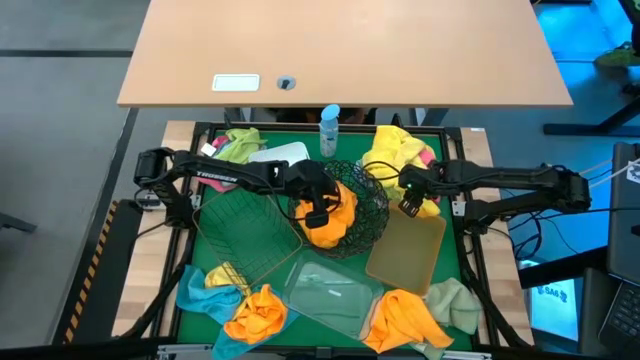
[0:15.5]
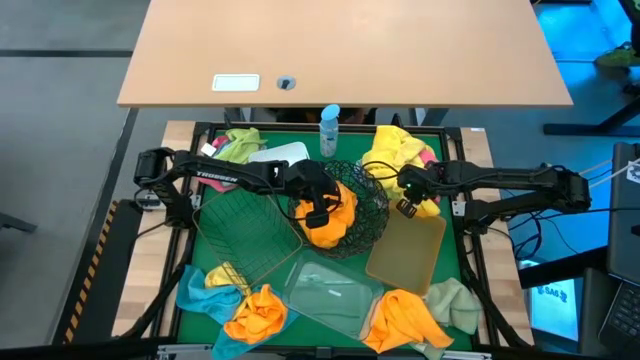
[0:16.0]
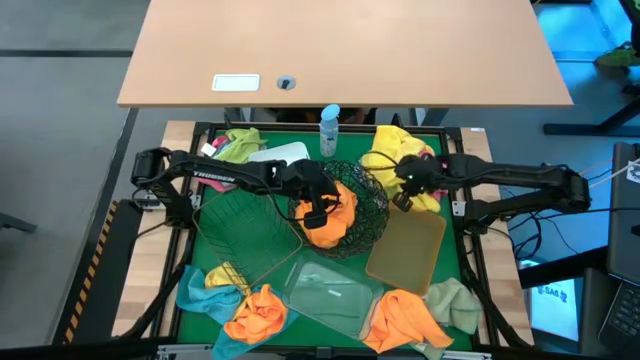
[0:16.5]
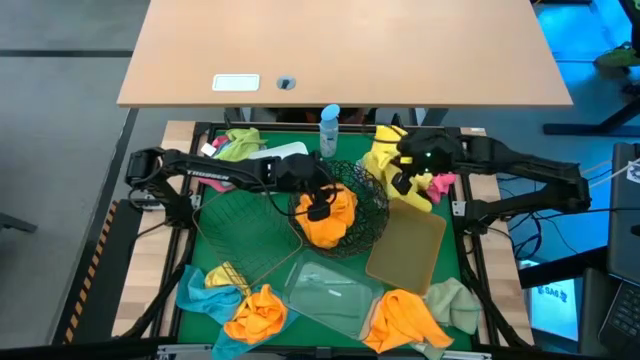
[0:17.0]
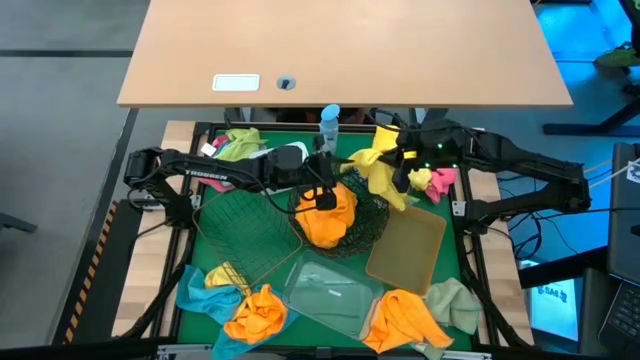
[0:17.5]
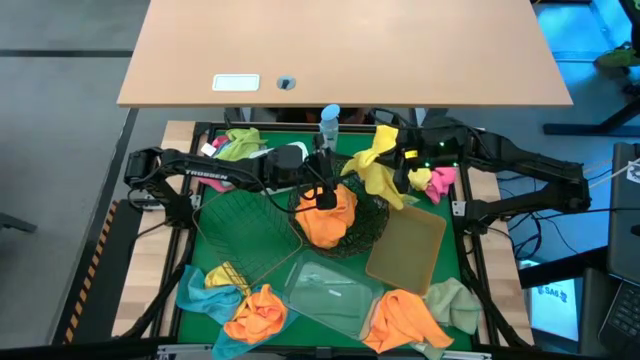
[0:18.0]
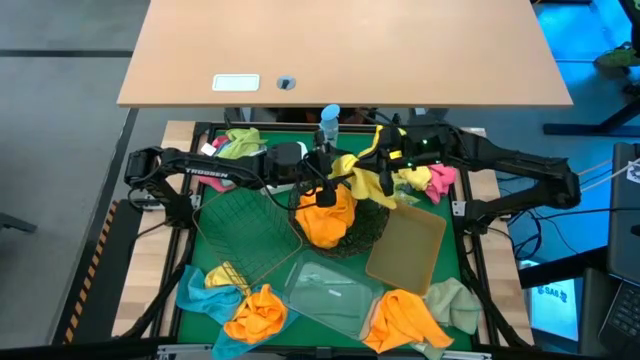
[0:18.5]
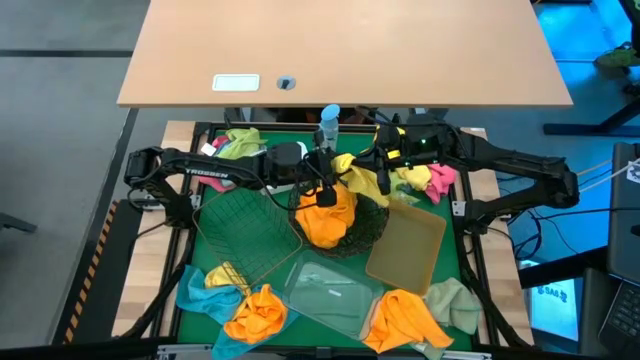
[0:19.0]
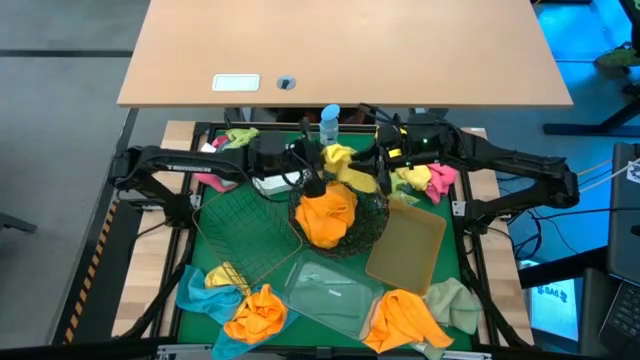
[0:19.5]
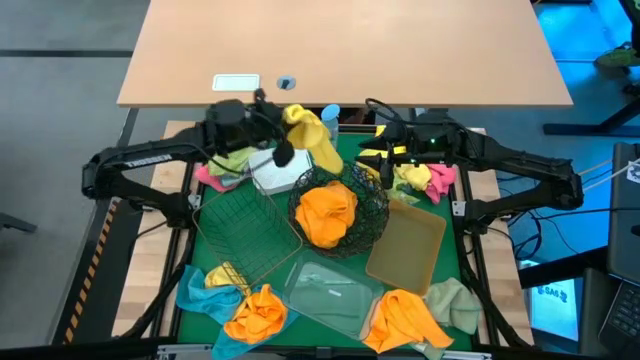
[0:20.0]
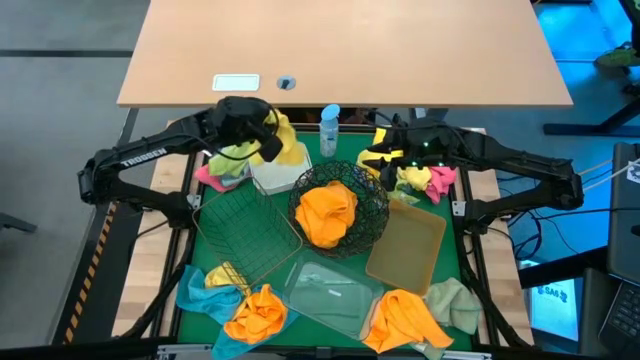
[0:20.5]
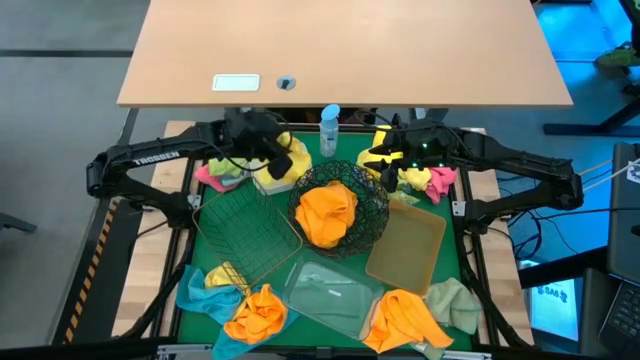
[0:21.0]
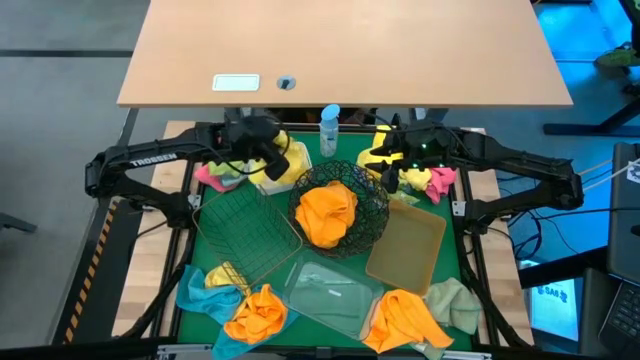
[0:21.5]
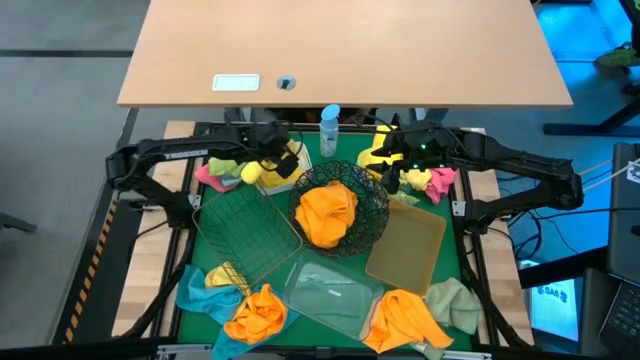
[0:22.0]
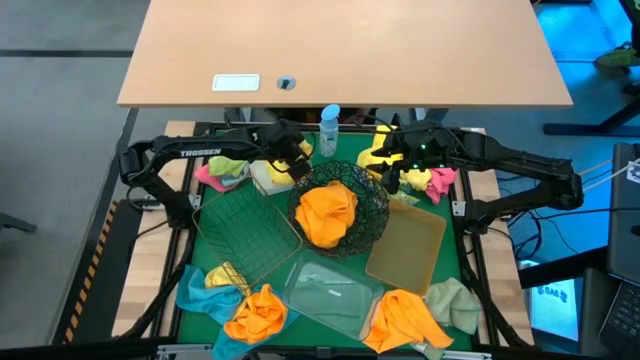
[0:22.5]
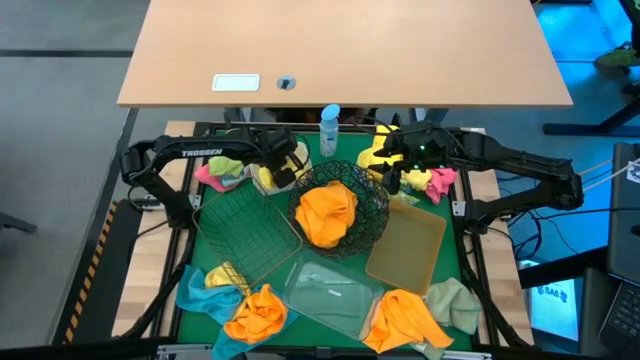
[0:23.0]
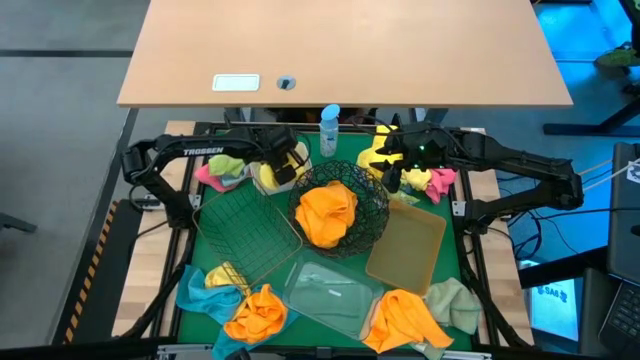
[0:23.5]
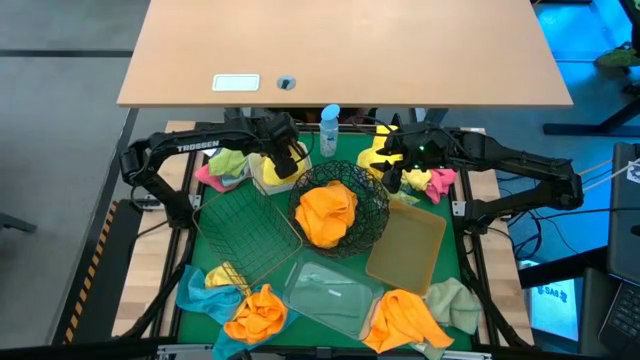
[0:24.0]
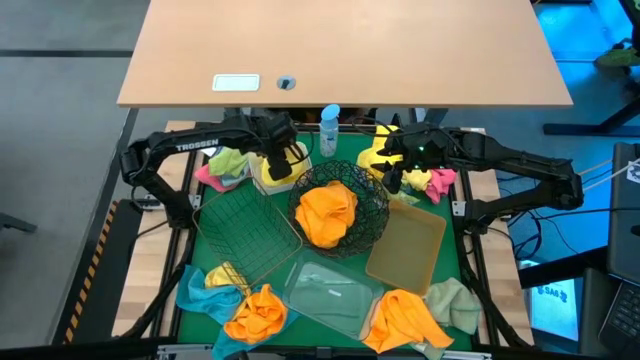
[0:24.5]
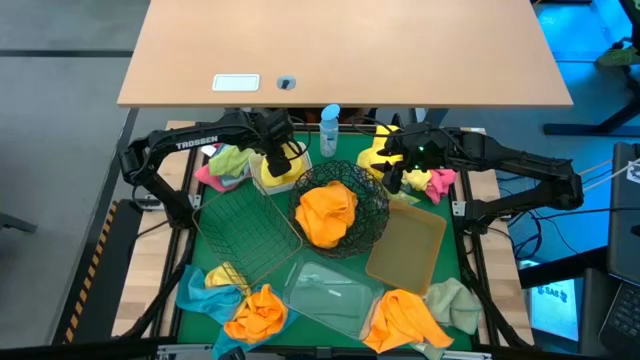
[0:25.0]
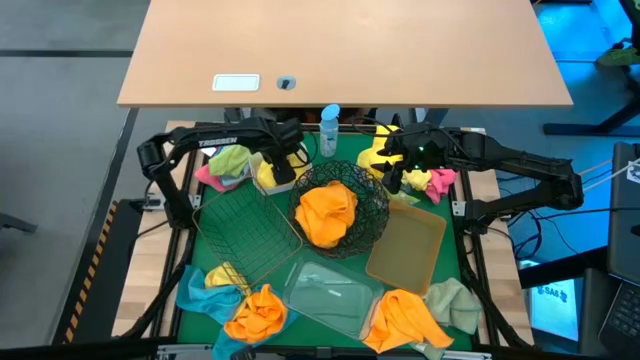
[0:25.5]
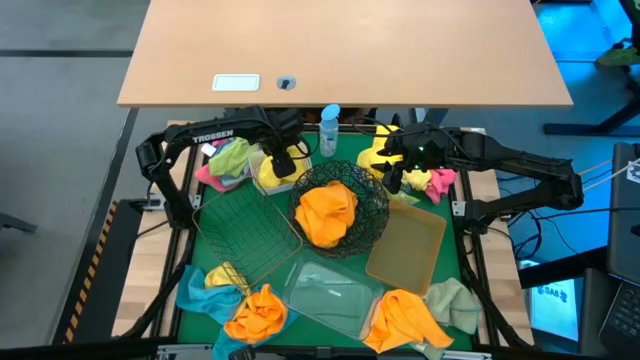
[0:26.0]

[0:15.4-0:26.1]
Task: Sort microfiber towel by color & place in baskets
Put the yellow towel into the white bin

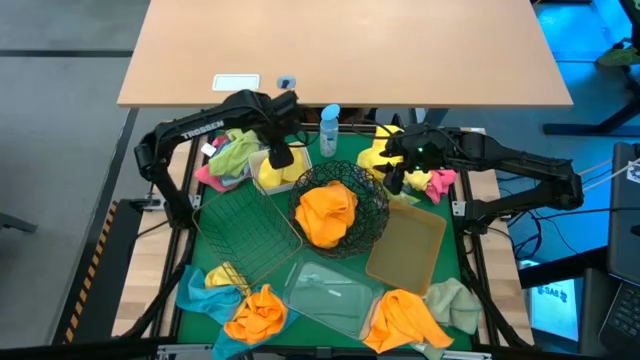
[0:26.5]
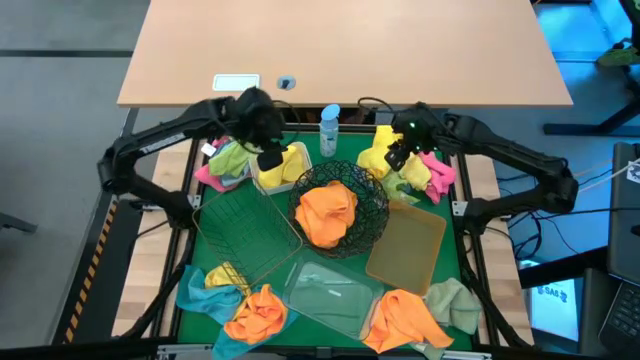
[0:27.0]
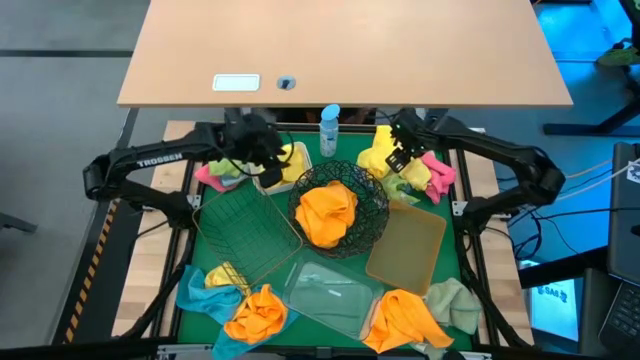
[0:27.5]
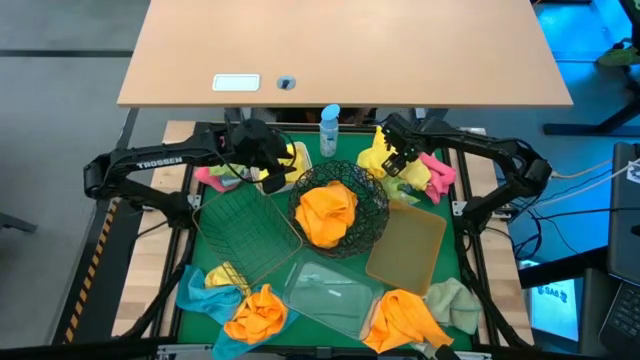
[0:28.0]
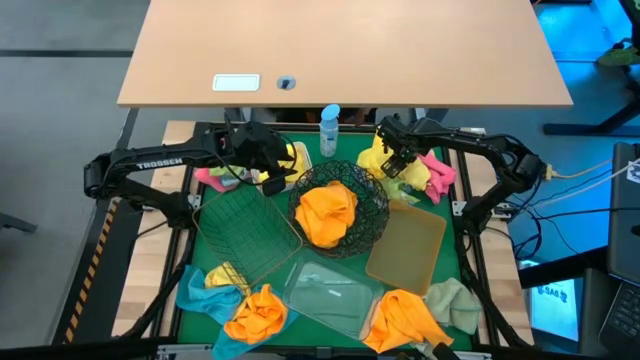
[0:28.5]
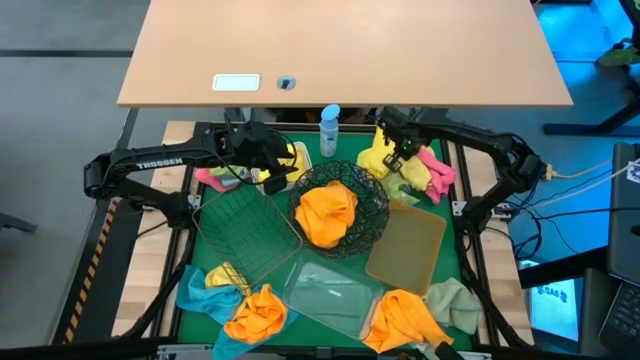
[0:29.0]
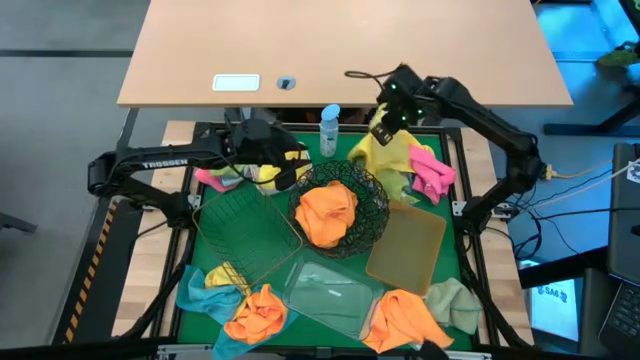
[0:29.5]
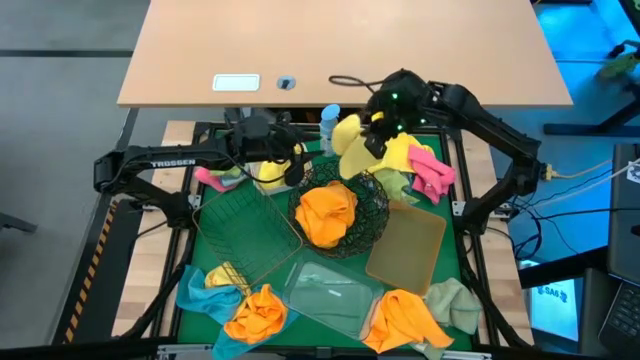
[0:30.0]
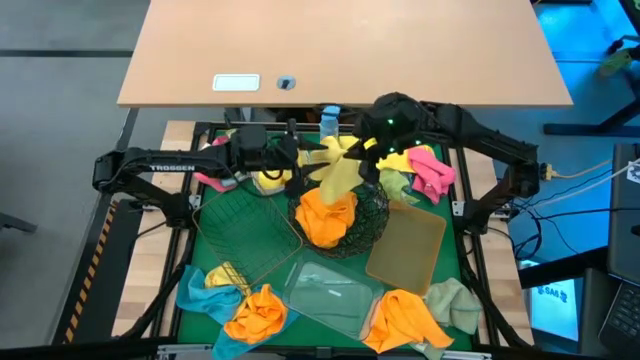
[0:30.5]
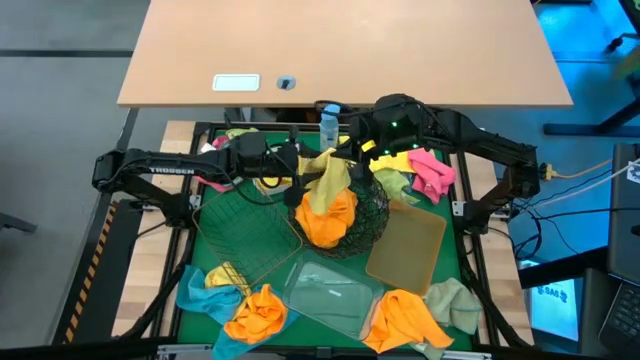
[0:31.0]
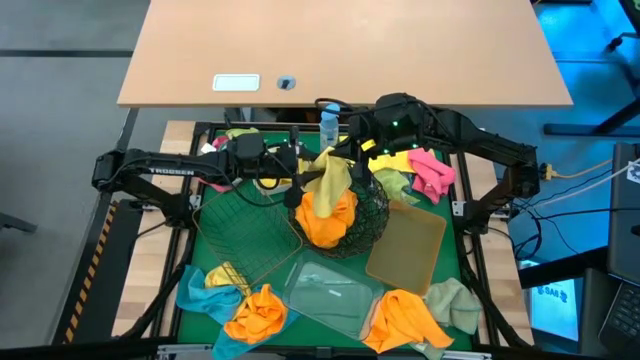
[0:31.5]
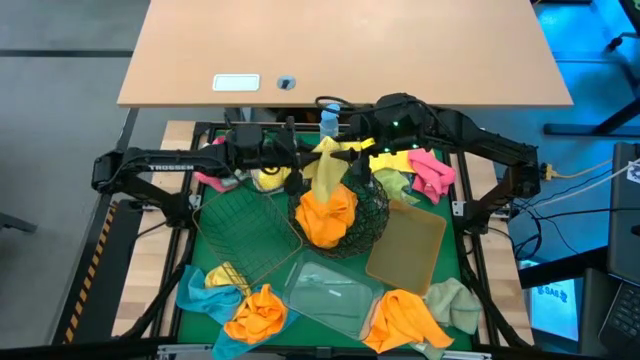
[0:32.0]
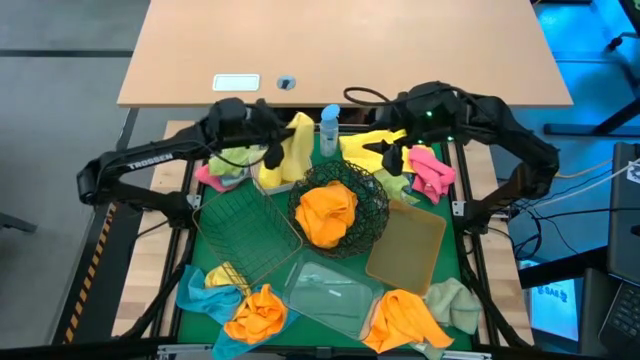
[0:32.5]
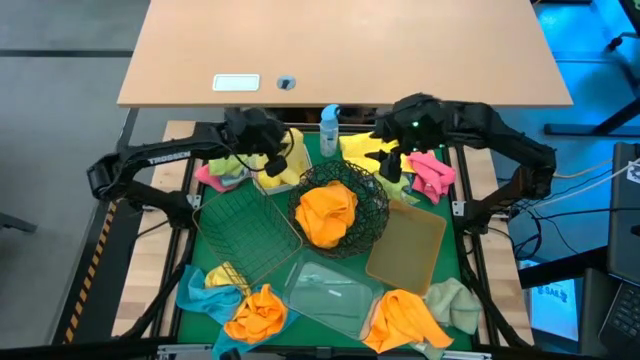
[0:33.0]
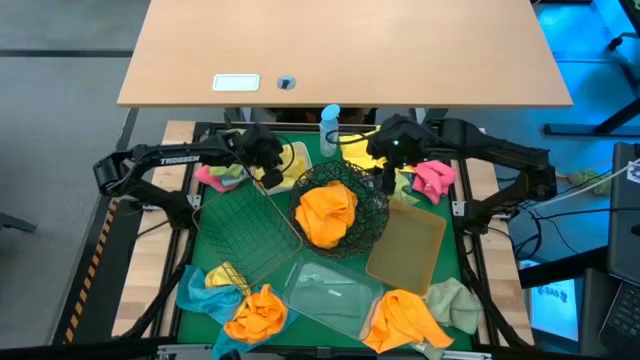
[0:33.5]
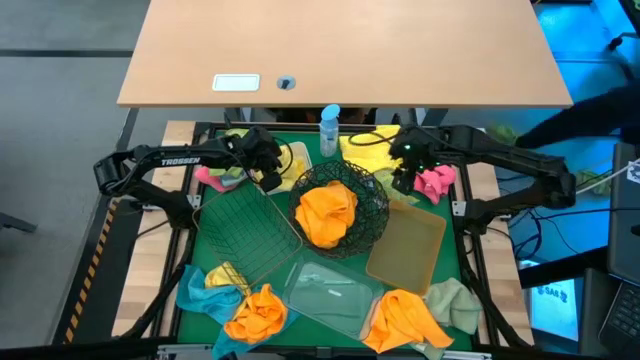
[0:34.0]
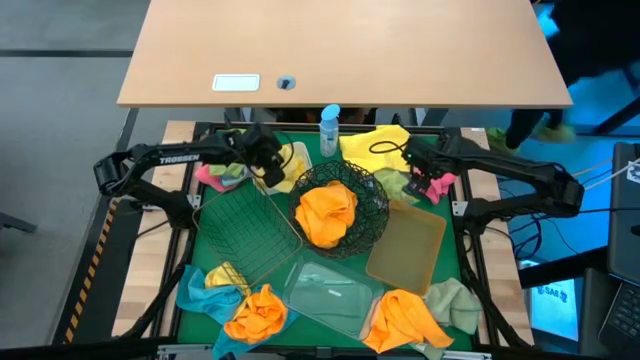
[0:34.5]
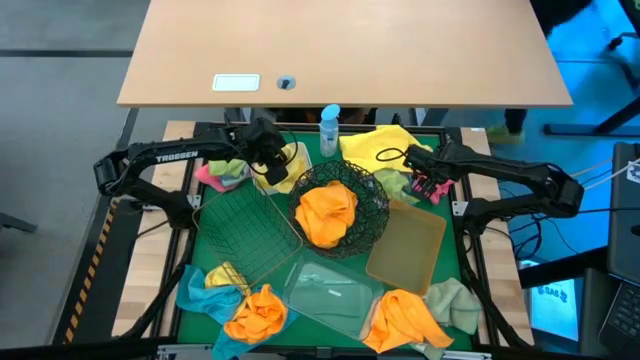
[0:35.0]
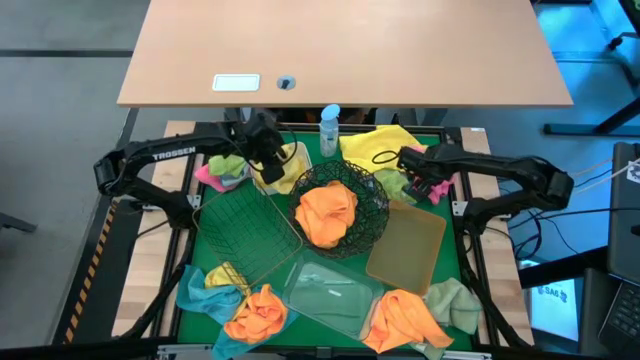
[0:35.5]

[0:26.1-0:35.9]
Put the yellow towel into the white bin
